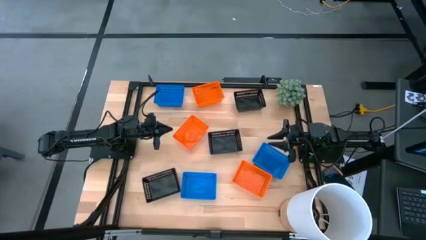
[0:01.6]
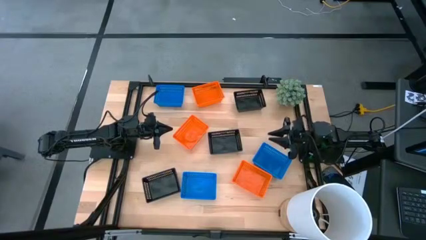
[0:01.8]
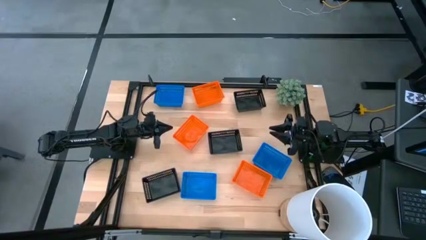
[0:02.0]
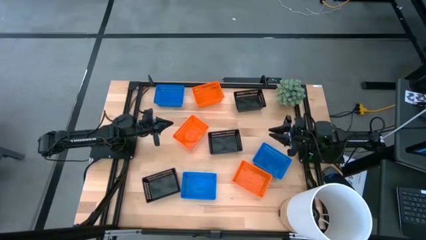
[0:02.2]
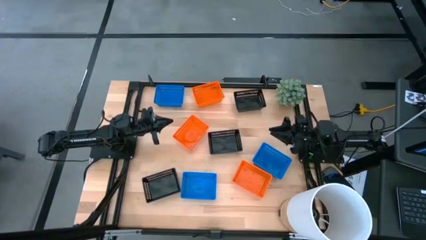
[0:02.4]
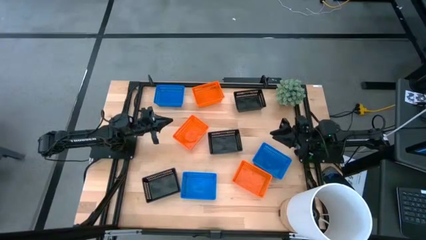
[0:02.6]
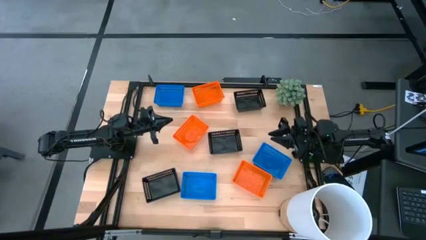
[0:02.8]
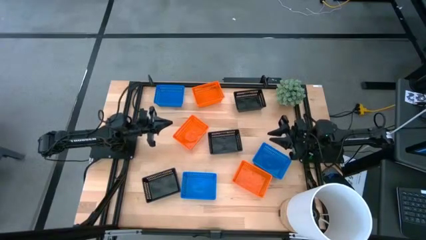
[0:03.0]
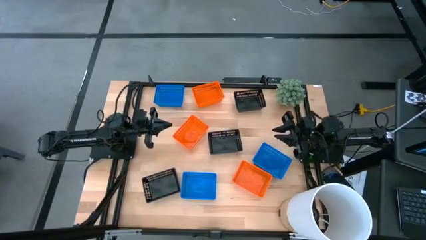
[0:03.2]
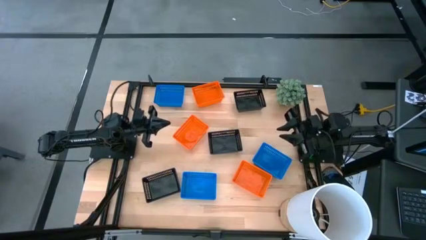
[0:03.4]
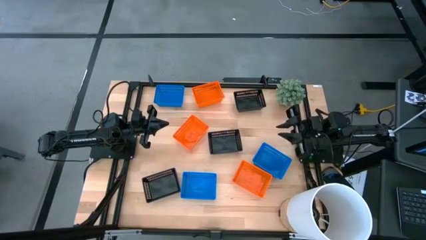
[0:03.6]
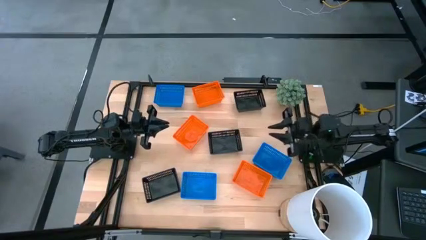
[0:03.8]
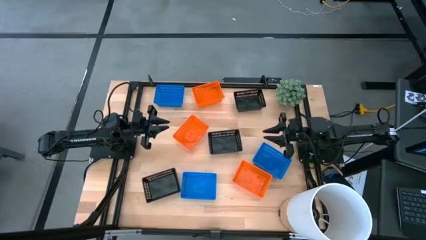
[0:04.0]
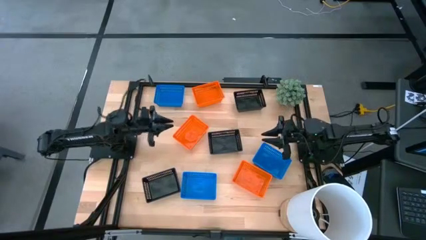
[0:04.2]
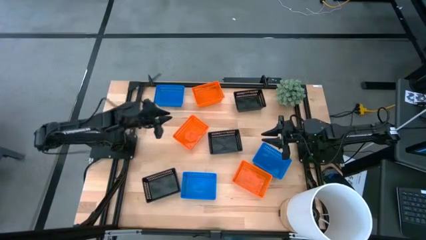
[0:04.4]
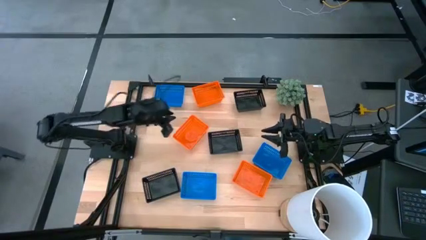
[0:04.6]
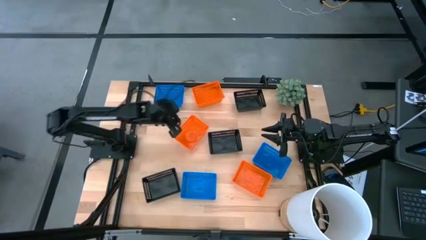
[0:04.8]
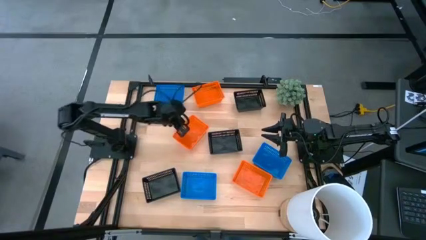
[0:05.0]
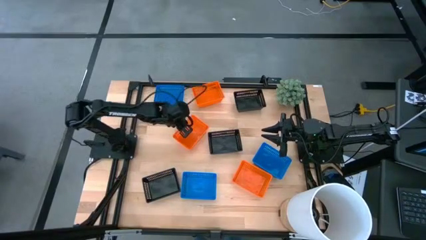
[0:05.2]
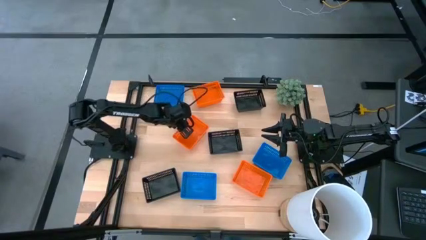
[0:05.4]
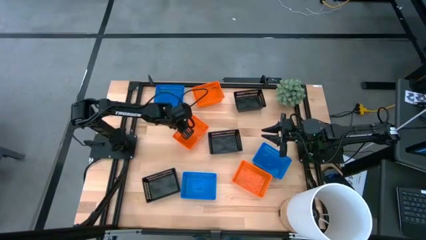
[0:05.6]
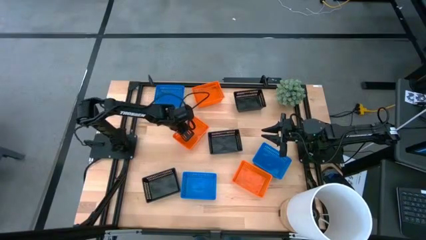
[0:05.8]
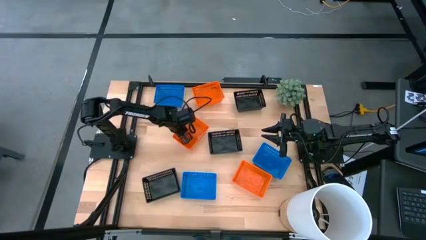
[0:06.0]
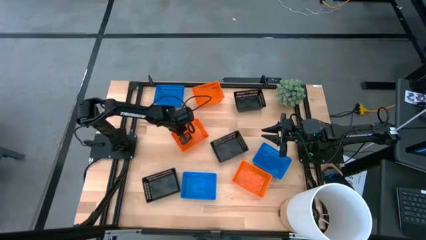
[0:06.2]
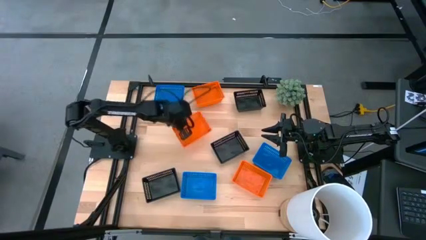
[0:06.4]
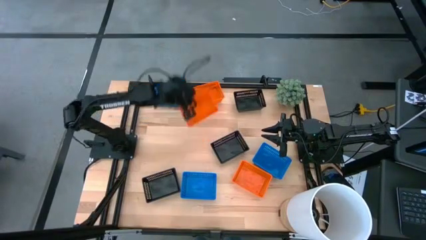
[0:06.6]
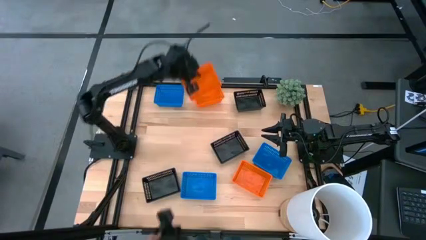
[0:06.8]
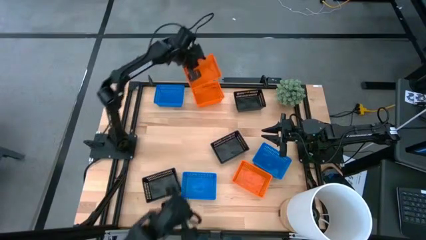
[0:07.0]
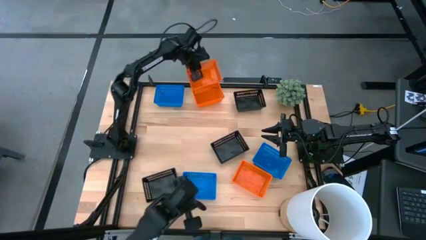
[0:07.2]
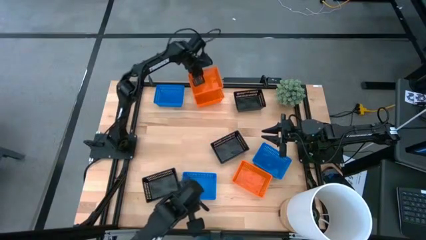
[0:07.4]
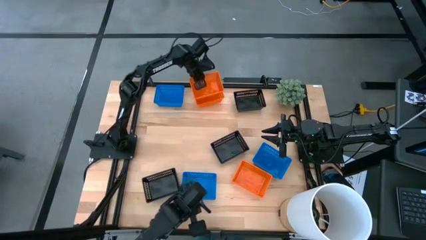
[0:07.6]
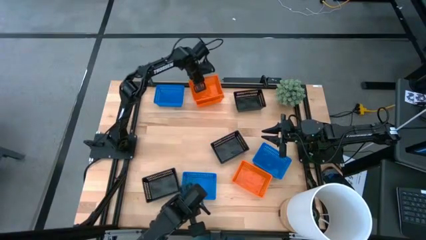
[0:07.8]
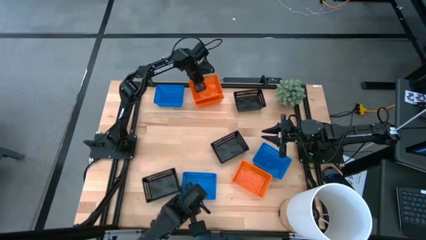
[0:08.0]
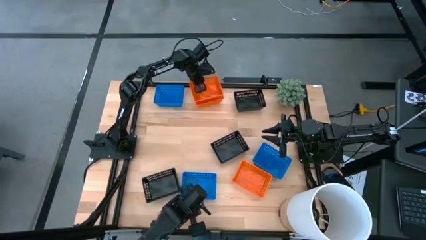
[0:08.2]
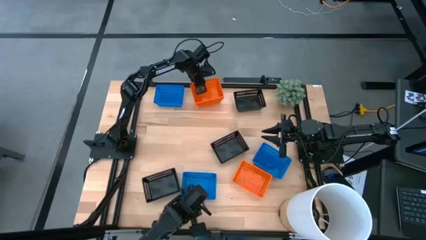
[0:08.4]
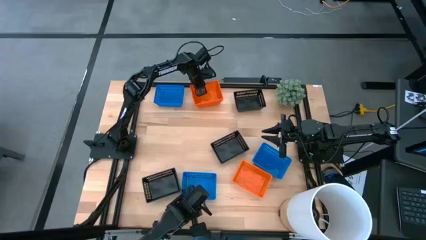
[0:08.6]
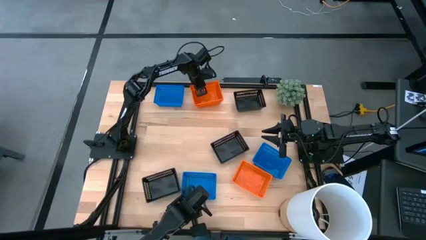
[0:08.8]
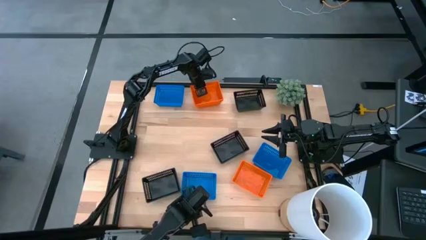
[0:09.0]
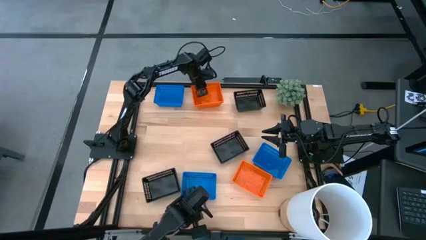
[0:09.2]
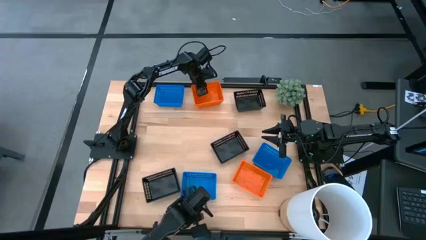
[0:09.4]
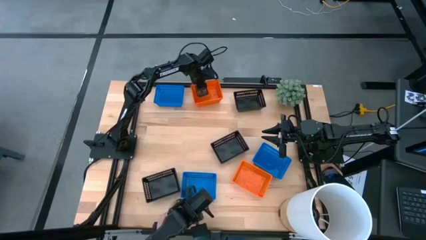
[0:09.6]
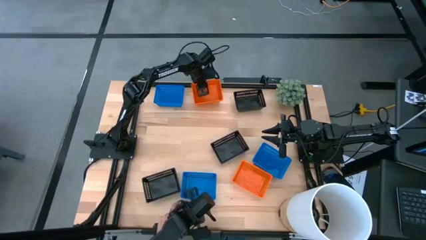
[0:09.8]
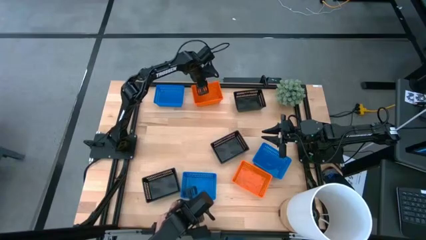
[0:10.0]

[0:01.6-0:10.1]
Stack the middle left orange bin on the top orange bin

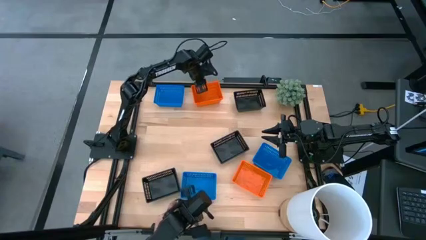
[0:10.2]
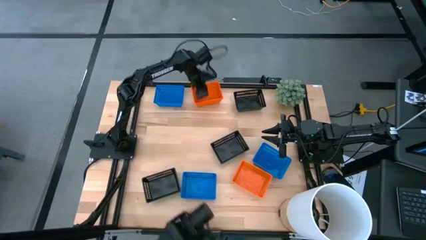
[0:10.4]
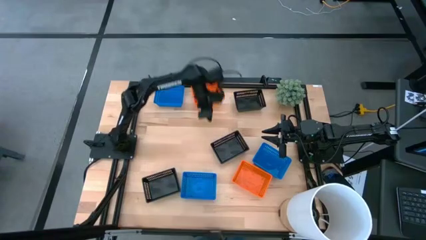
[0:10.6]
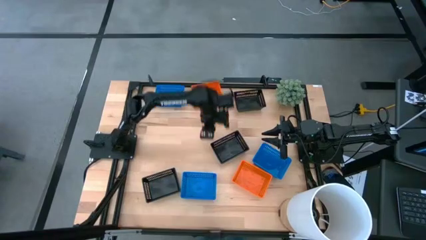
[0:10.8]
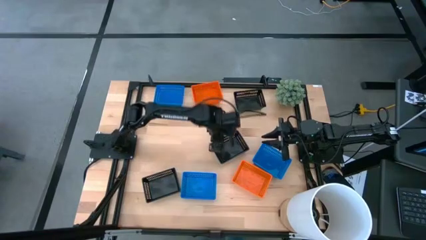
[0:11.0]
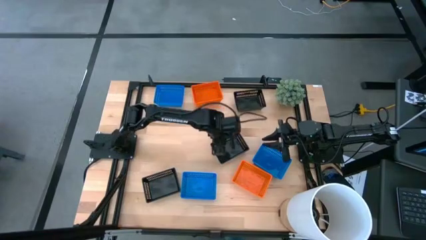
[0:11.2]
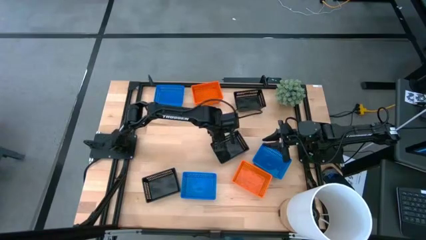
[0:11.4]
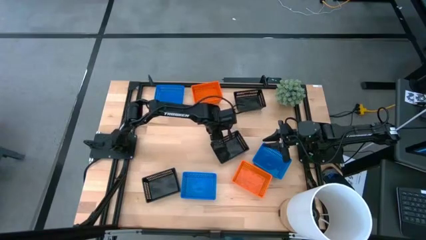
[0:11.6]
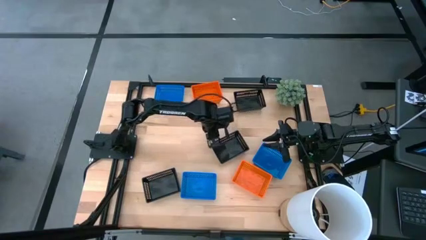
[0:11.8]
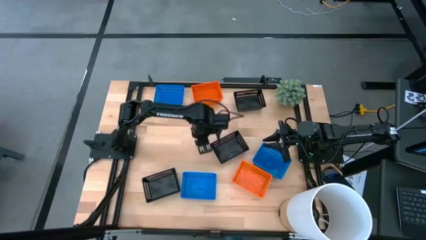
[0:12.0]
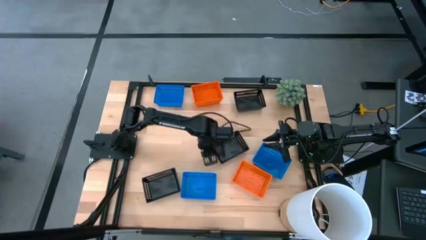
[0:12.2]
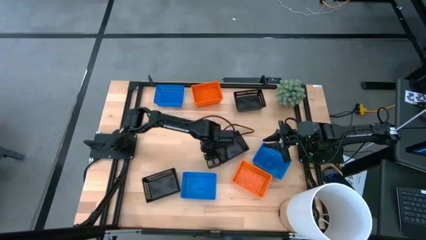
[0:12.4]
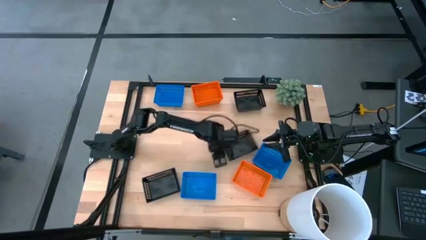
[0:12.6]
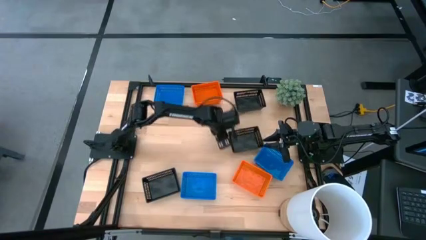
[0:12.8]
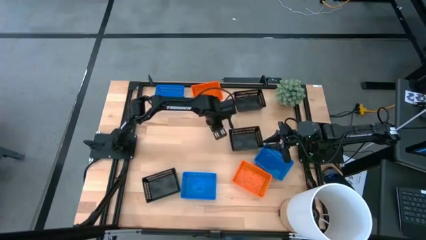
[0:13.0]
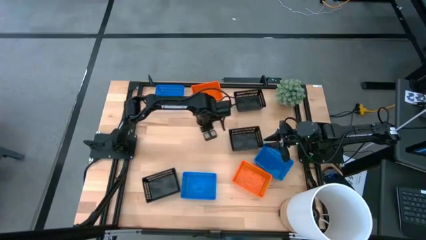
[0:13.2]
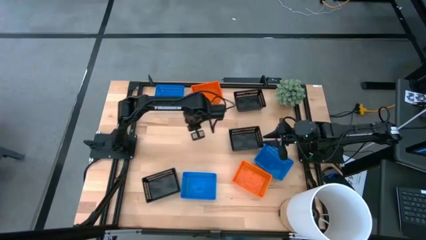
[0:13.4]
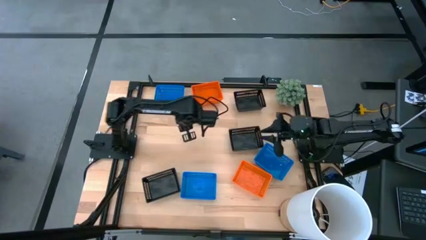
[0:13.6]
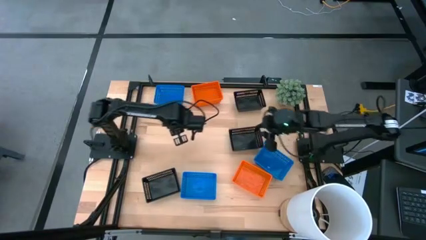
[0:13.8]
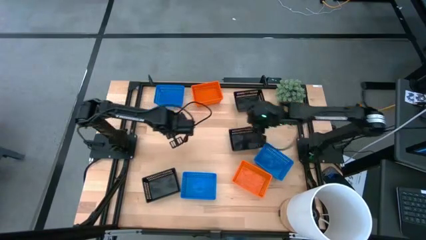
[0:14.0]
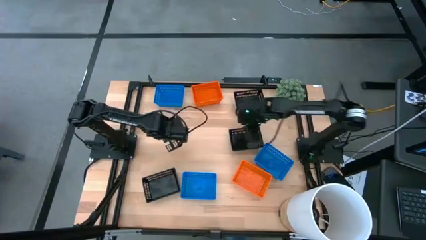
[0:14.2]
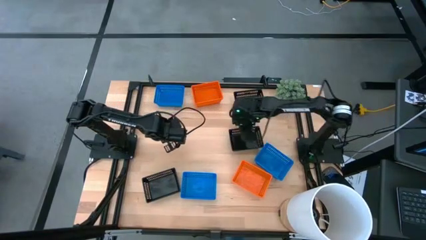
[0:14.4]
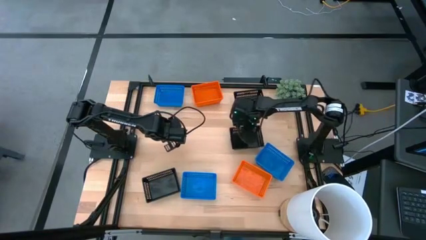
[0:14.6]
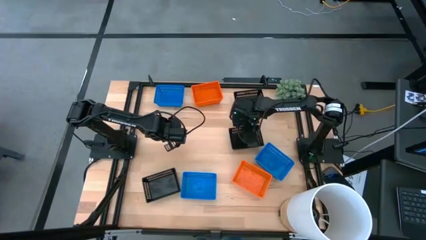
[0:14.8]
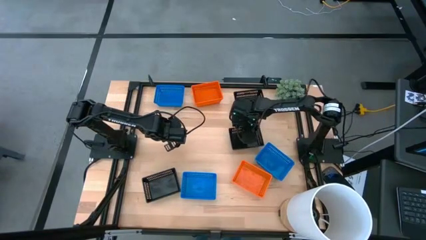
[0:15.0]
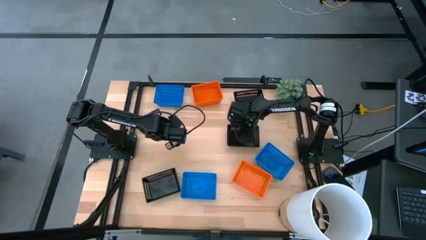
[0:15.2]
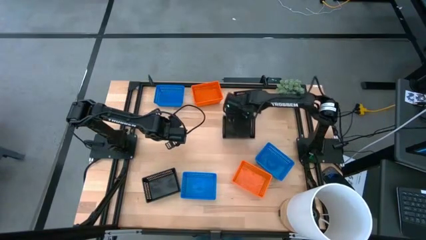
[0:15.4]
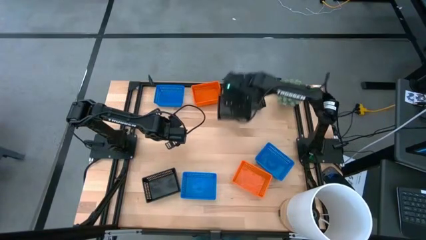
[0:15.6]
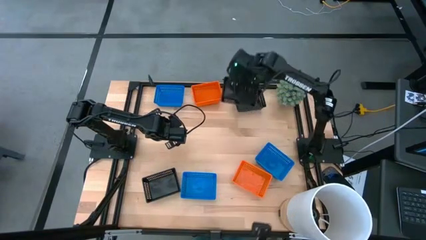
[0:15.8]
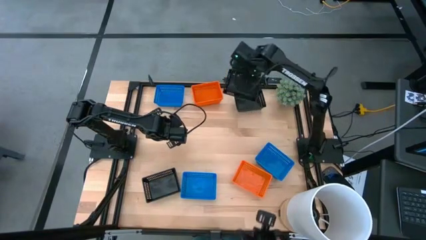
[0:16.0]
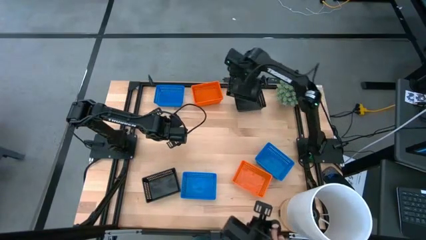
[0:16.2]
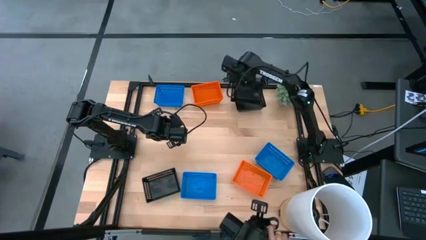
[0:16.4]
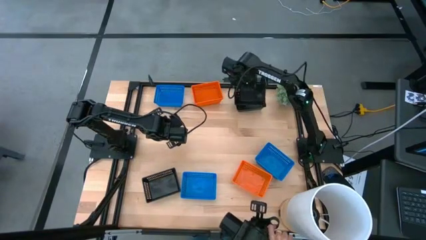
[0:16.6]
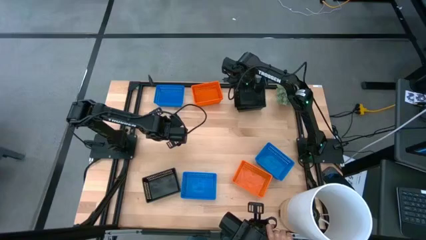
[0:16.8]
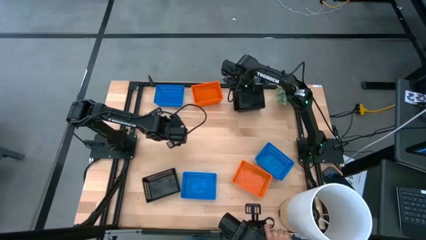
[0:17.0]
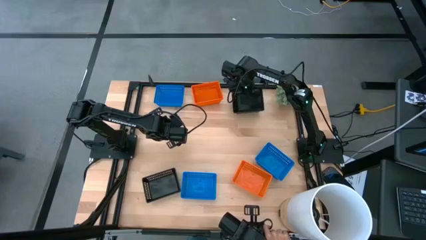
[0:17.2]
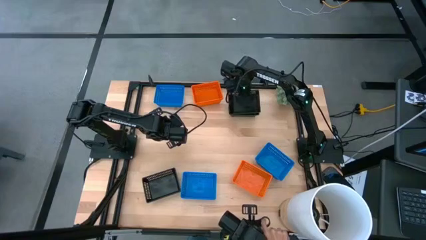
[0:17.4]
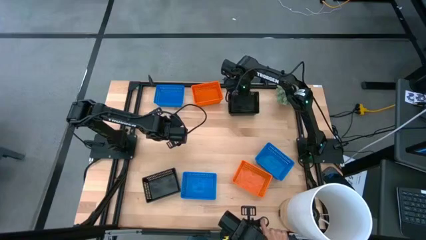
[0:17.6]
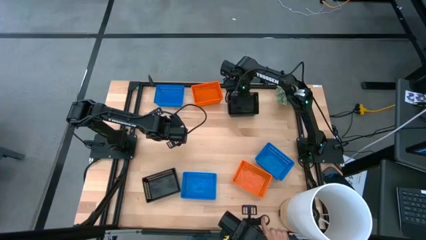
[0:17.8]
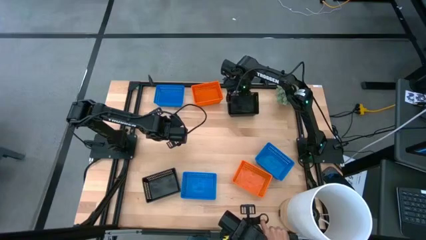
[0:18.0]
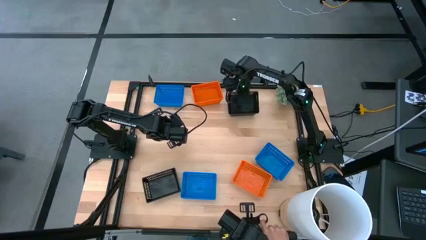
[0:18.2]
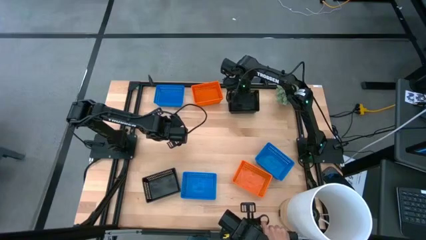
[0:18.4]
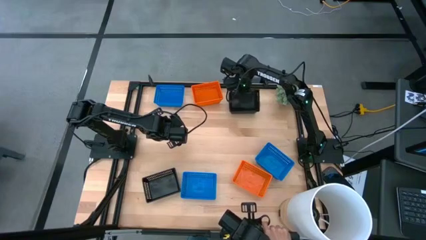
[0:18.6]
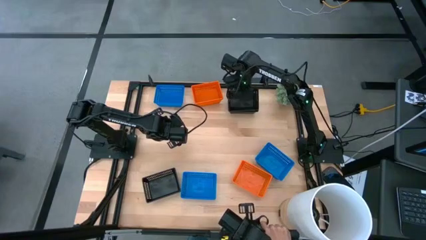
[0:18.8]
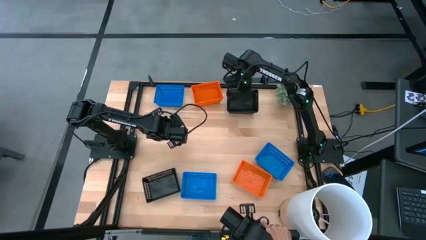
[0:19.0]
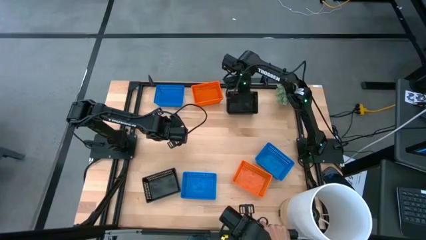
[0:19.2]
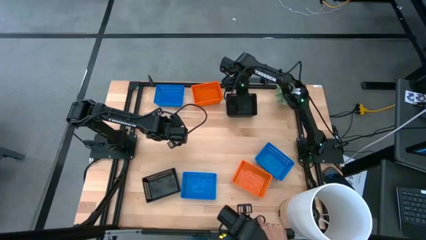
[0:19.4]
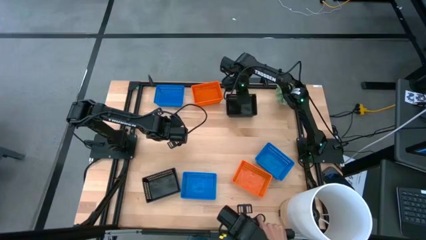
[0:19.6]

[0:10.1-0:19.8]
Stack the middle right black bin on the top black bin
